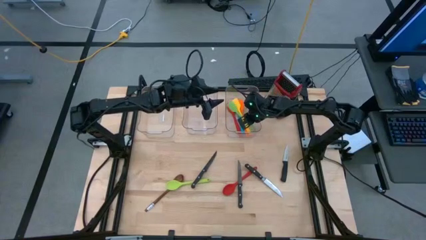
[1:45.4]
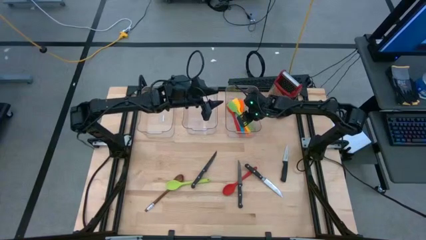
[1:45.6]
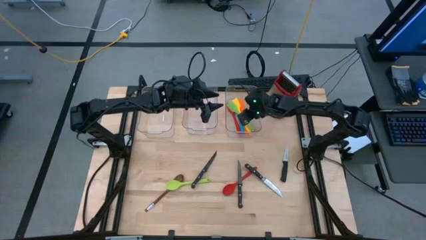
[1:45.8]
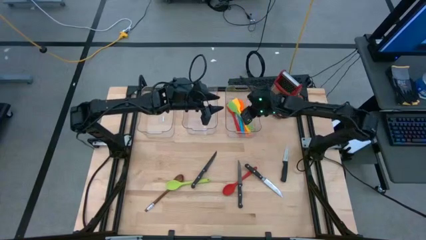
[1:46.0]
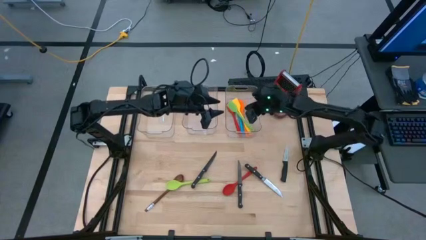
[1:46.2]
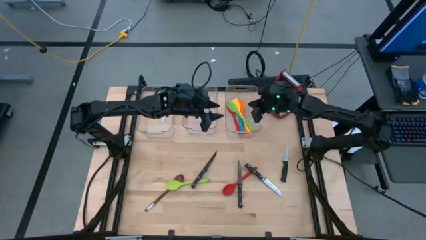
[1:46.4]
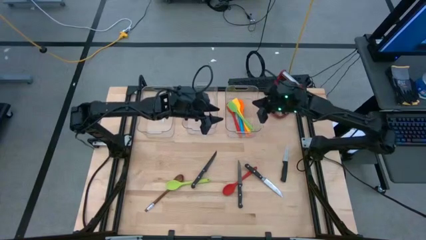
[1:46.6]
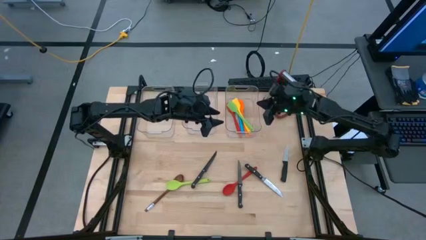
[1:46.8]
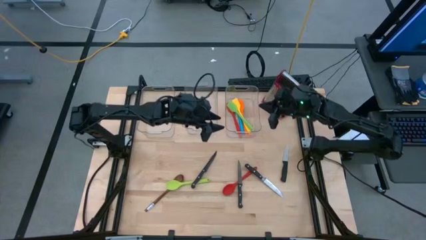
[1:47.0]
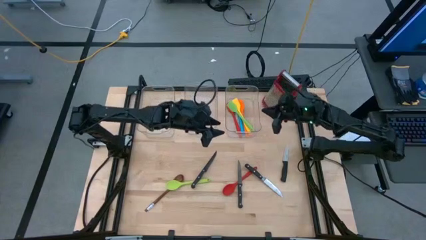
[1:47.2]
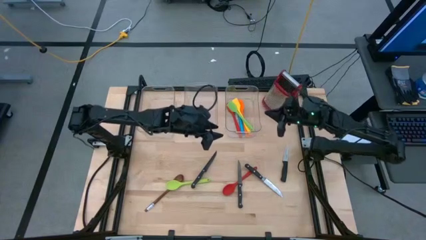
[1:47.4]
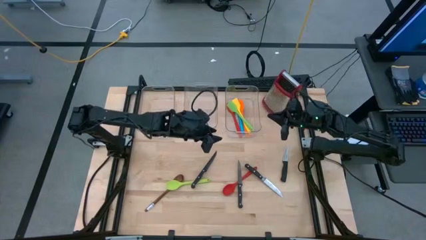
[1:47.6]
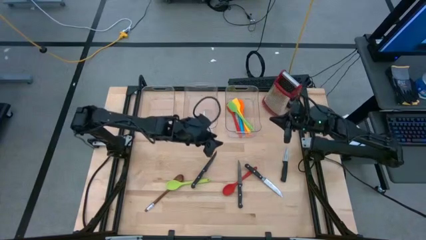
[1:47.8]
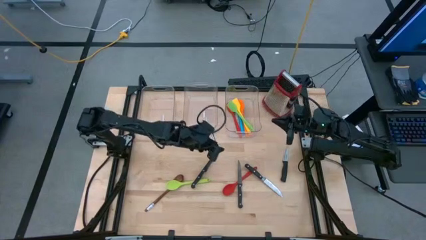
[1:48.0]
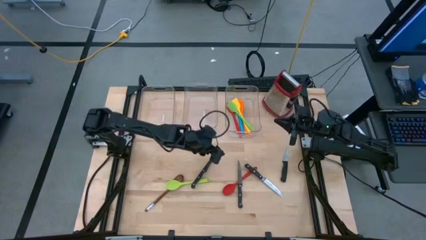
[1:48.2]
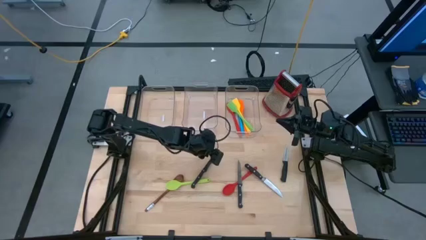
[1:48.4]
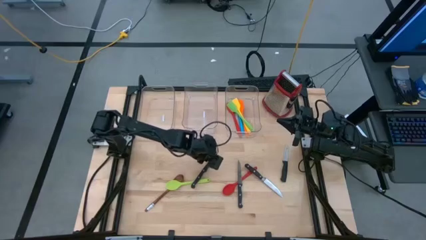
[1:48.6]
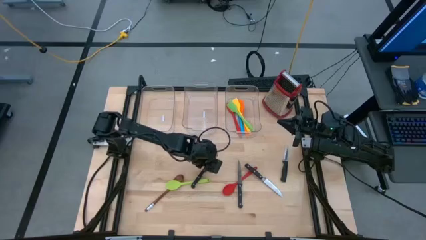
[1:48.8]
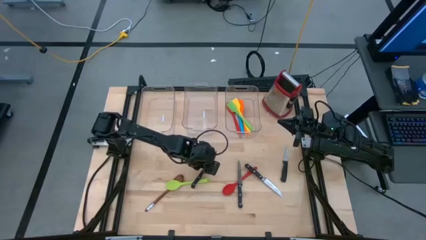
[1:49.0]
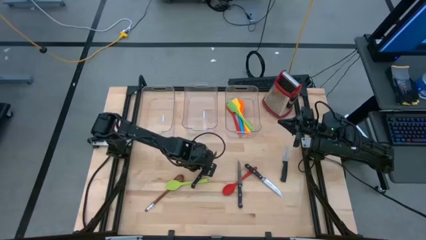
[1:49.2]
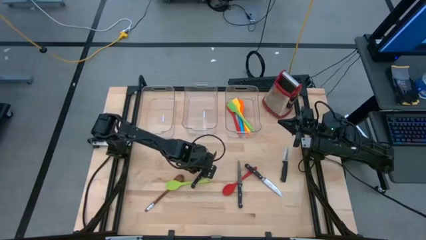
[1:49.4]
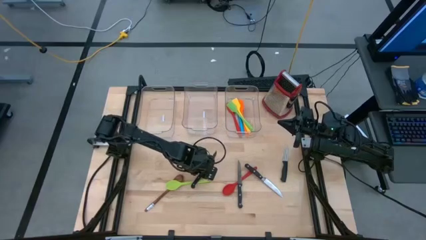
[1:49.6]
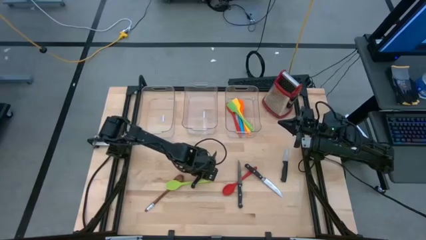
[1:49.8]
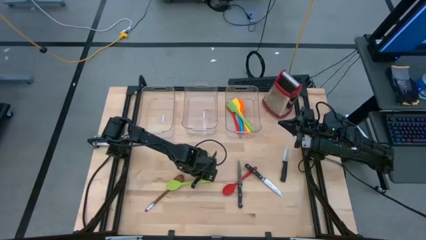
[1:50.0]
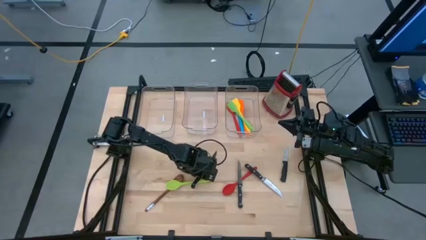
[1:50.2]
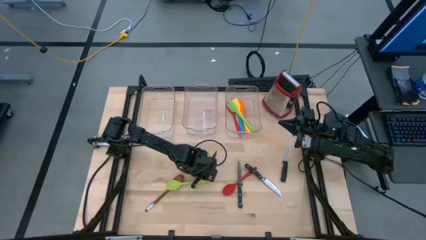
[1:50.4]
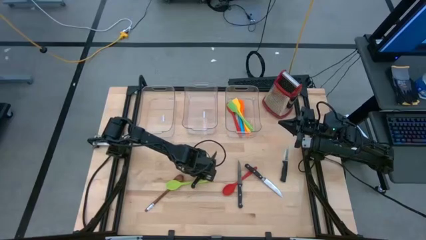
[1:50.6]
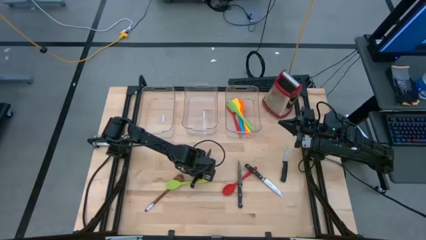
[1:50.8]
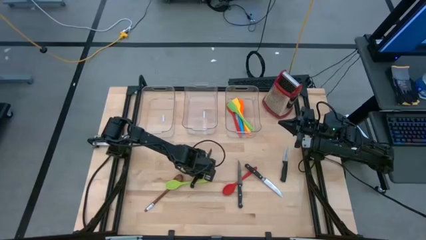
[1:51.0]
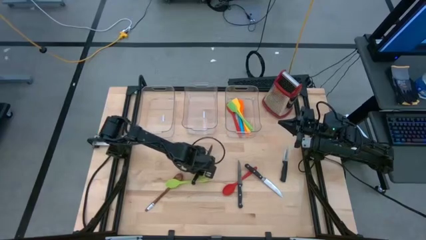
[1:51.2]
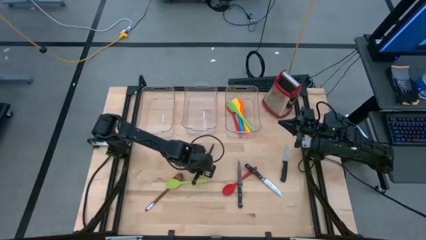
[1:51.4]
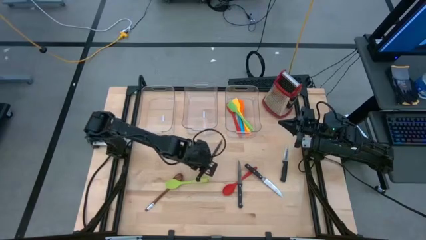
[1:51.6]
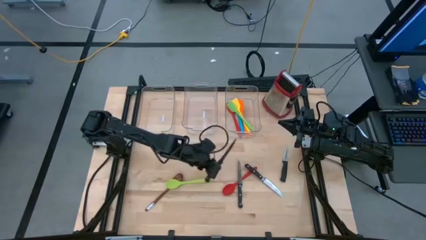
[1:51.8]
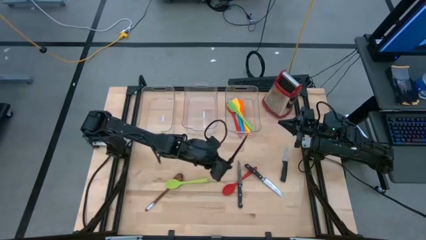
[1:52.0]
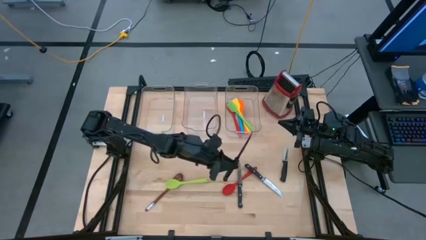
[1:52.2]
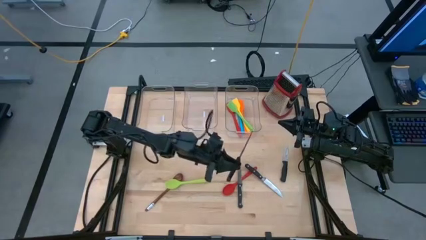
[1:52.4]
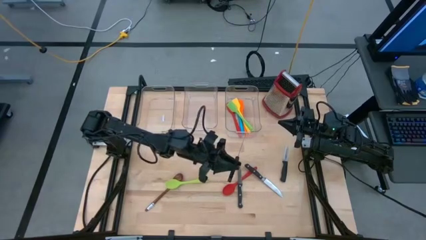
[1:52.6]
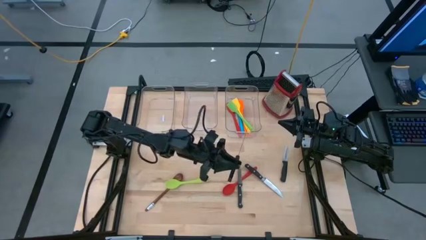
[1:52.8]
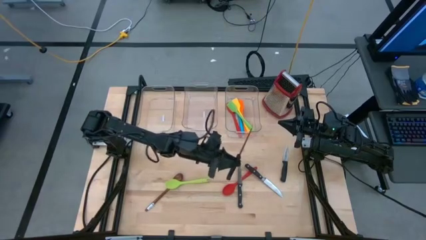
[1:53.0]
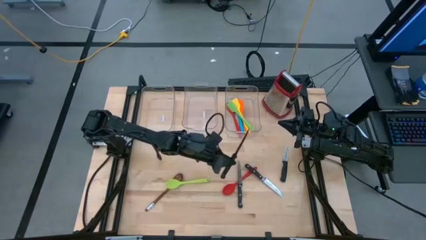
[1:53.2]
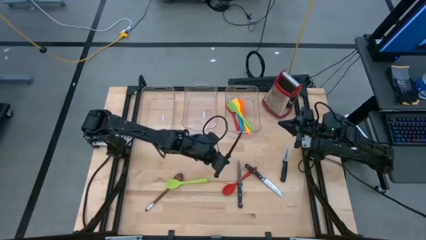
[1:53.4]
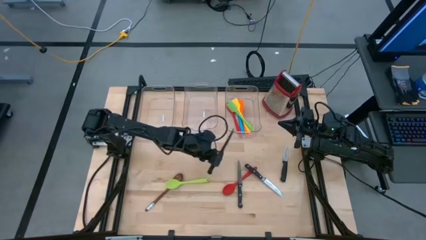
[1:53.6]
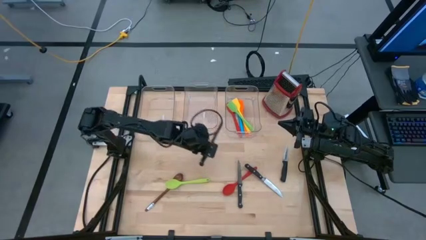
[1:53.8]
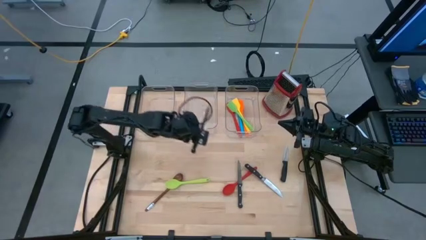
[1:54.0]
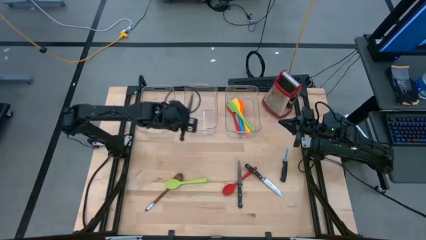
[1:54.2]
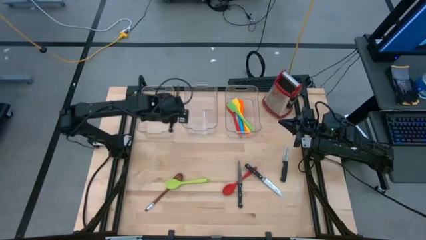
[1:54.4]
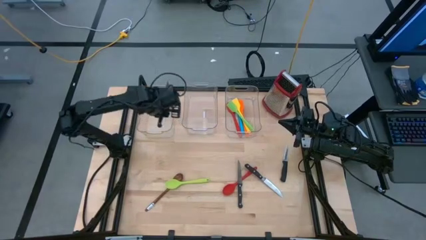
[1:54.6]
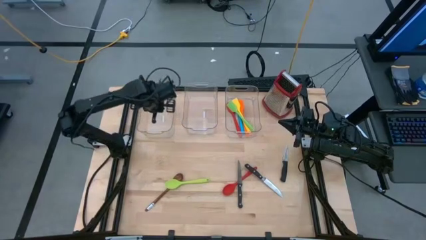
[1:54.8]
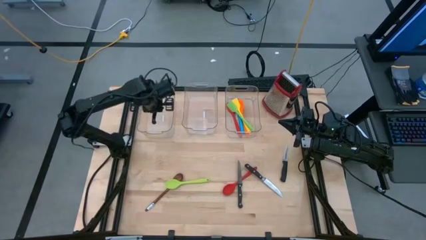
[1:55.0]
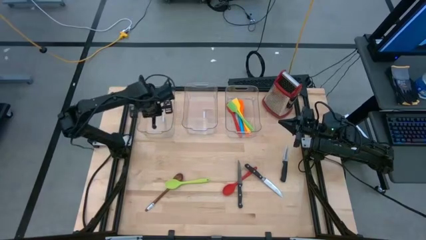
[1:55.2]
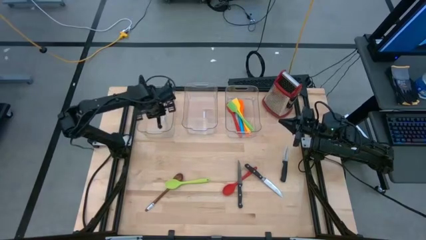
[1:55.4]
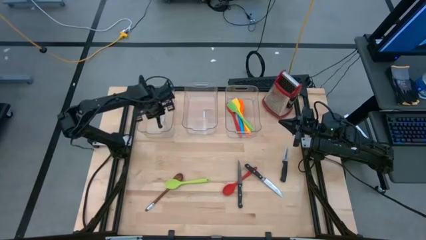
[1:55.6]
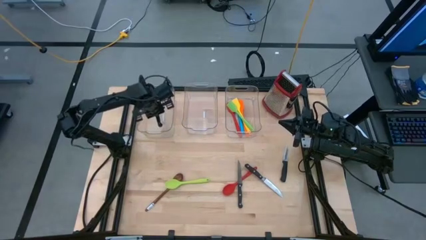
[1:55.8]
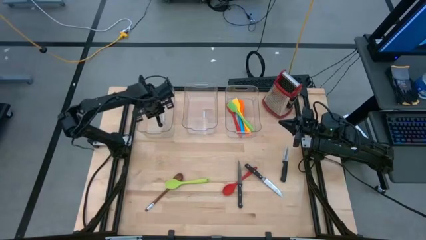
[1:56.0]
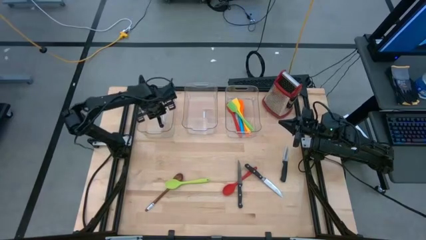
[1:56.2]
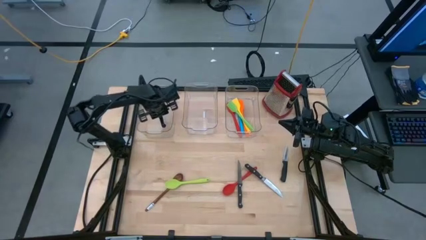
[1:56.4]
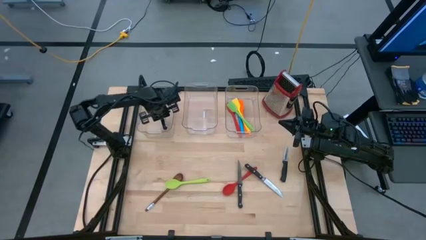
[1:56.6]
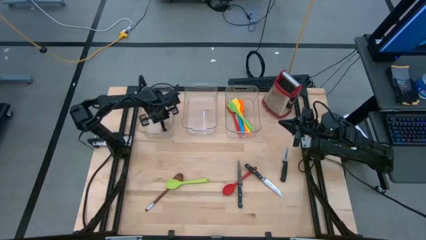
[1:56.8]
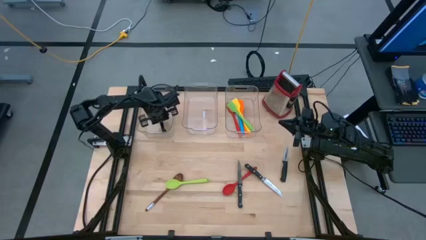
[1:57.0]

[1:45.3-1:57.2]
Task: Pick & Place Kitchen Items
Put the black knife into the left transparent bin

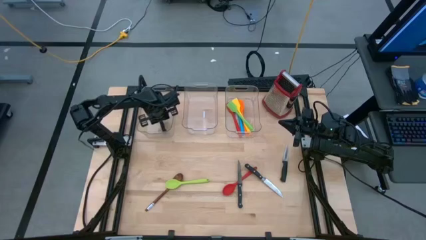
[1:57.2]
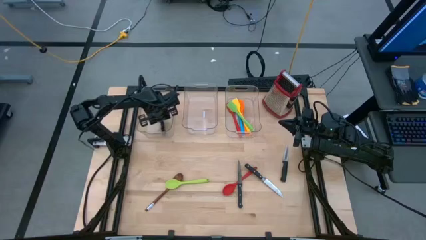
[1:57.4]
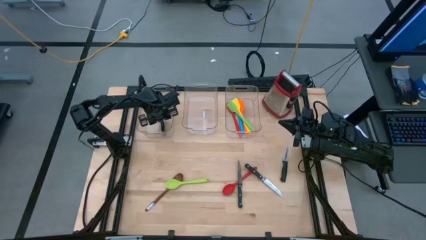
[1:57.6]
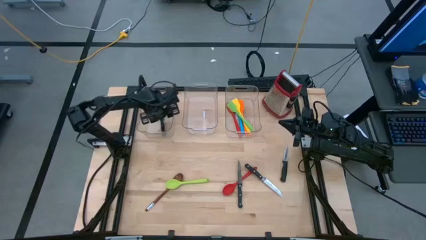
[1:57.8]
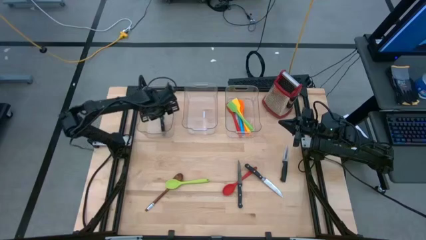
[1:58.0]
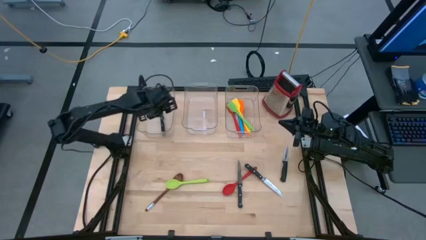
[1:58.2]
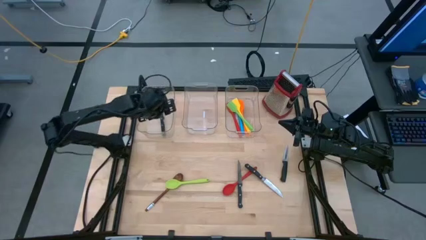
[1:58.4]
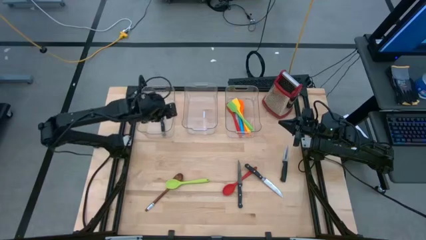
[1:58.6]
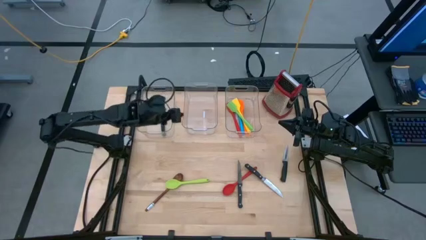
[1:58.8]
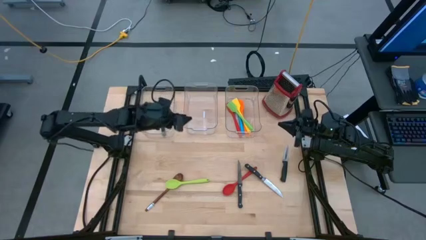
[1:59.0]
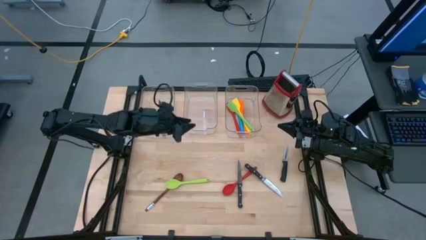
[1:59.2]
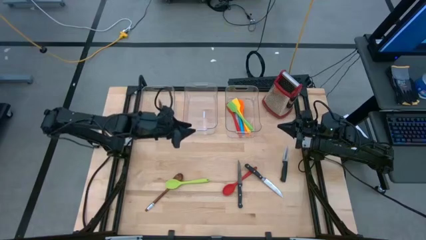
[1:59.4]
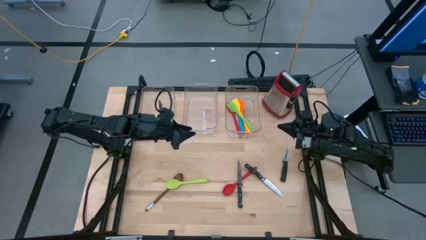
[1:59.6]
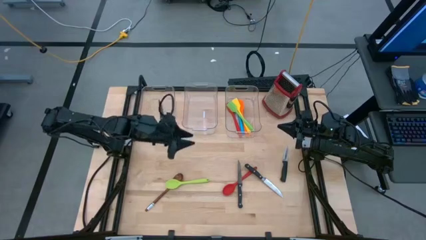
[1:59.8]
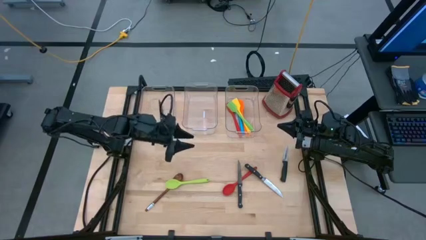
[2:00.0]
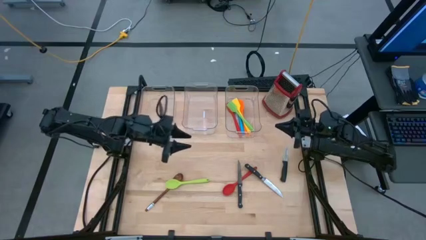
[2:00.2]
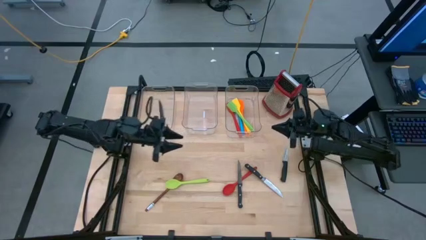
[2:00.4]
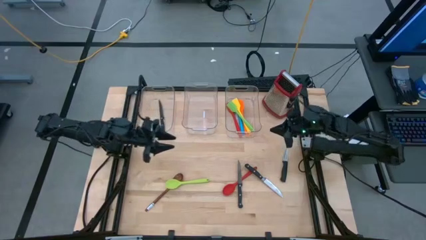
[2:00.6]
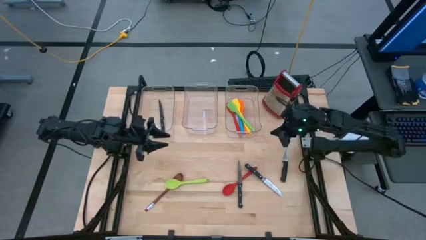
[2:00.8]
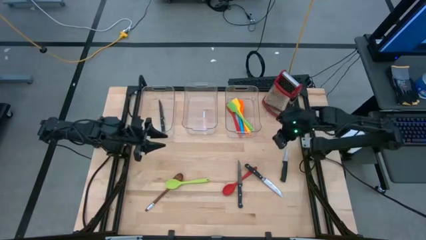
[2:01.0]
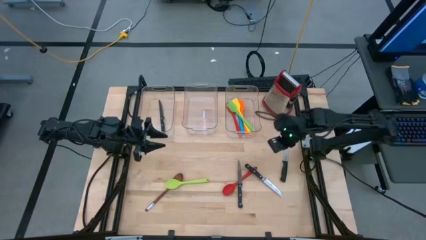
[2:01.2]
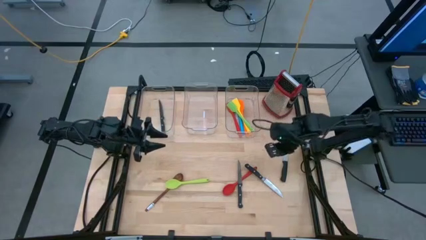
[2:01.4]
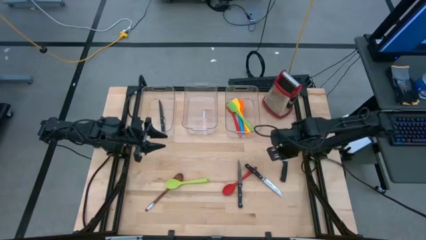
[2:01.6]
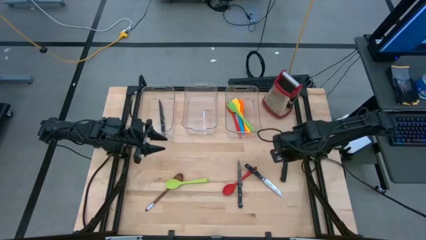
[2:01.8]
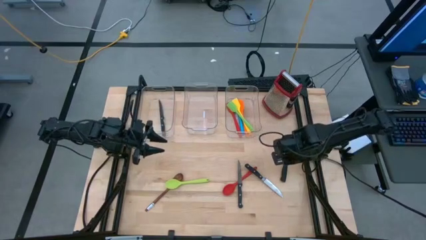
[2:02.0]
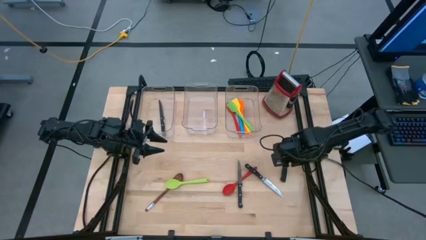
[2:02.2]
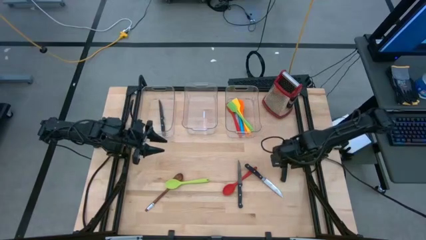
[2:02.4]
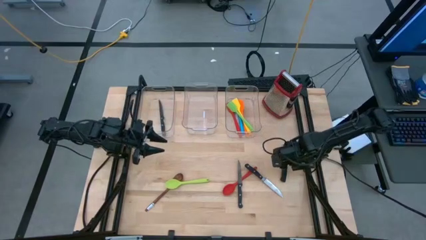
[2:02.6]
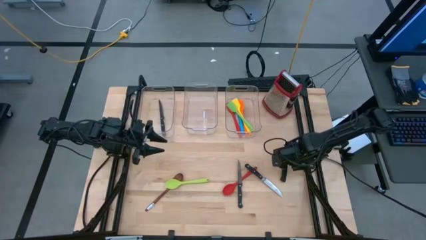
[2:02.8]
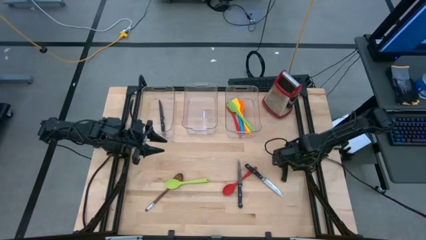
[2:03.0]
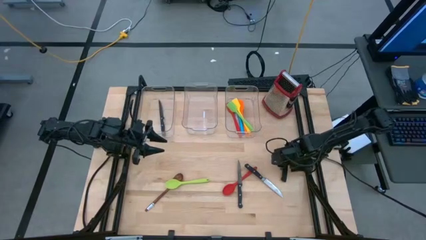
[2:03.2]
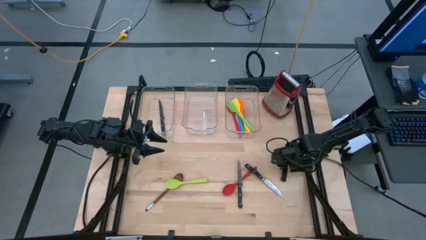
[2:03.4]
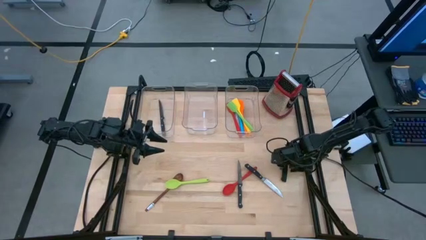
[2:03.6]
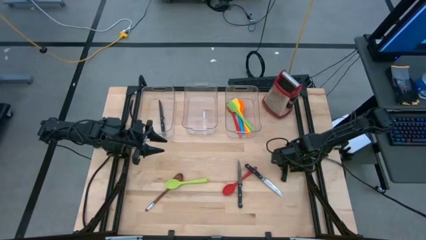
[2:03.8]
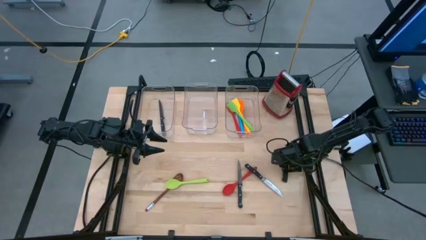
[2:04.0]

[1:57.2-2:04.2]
Put the black knife into the left transparent bin
